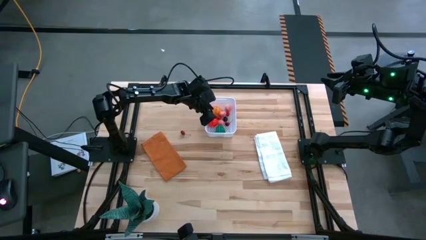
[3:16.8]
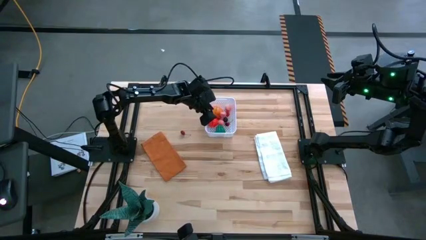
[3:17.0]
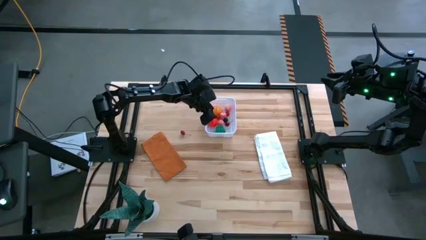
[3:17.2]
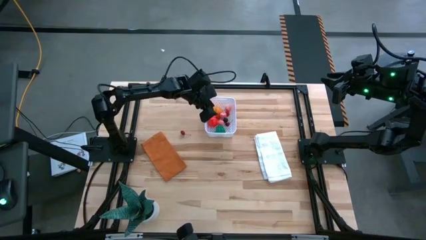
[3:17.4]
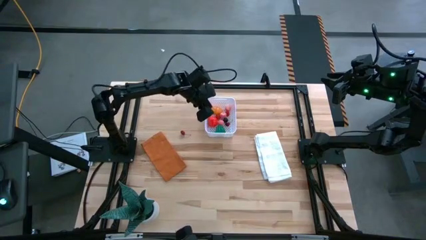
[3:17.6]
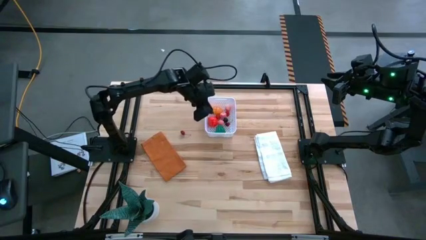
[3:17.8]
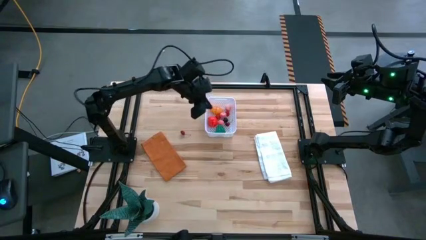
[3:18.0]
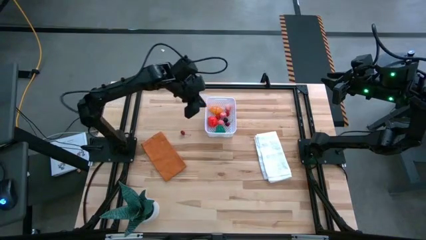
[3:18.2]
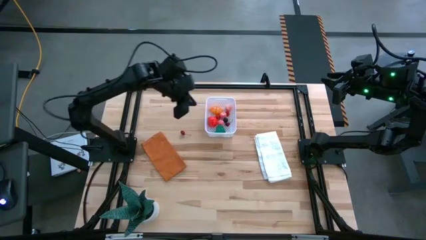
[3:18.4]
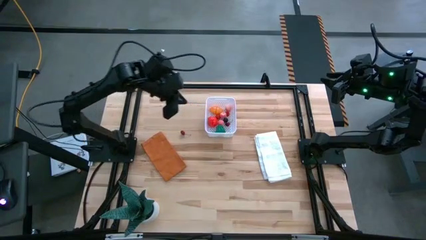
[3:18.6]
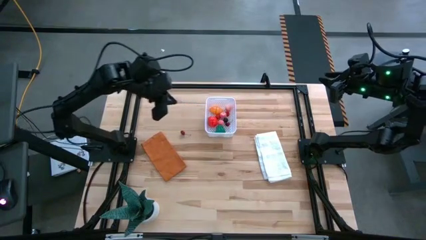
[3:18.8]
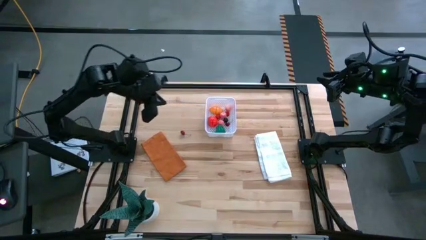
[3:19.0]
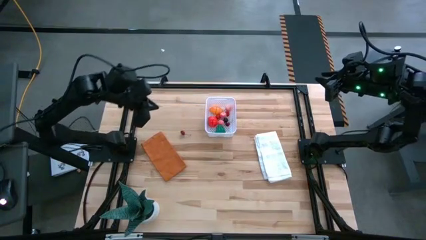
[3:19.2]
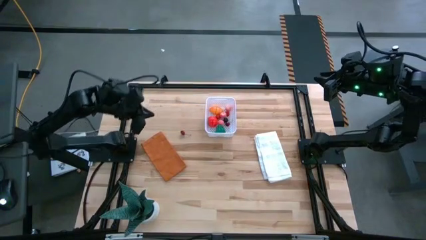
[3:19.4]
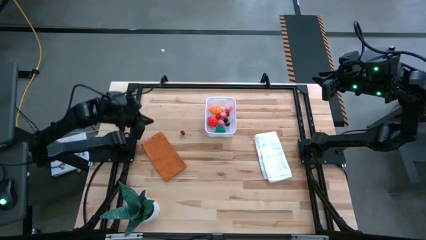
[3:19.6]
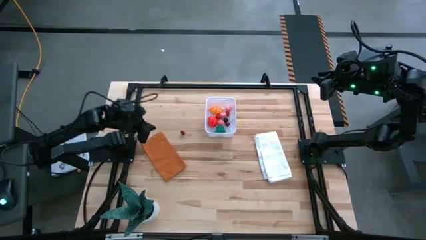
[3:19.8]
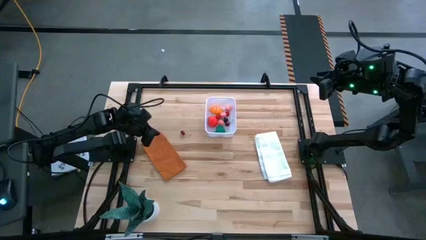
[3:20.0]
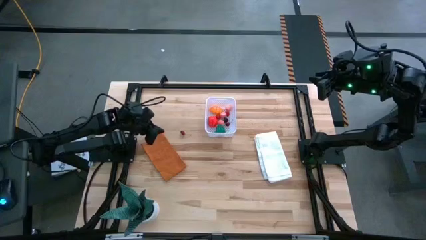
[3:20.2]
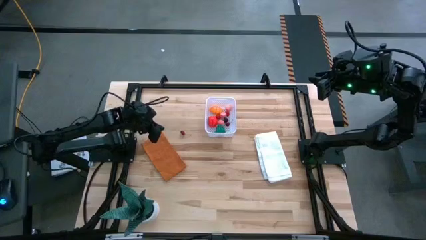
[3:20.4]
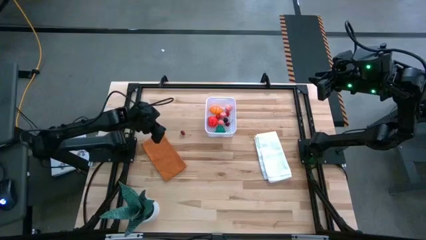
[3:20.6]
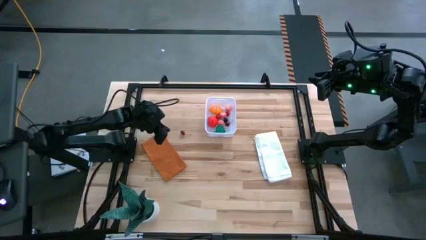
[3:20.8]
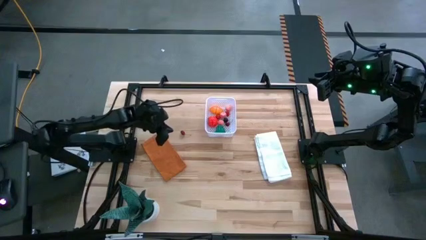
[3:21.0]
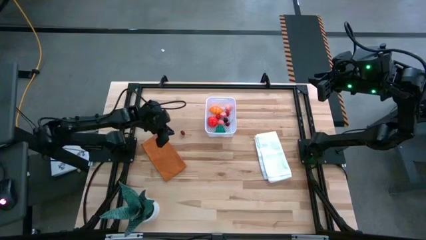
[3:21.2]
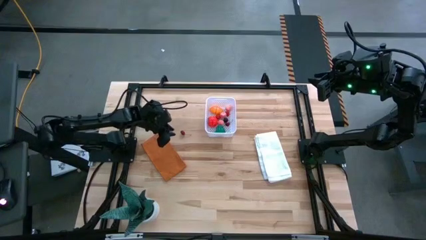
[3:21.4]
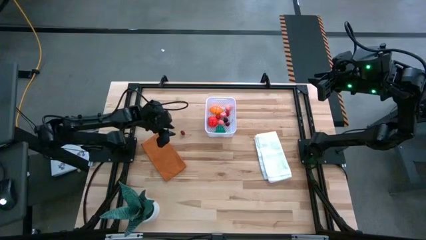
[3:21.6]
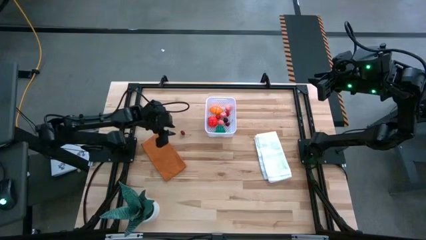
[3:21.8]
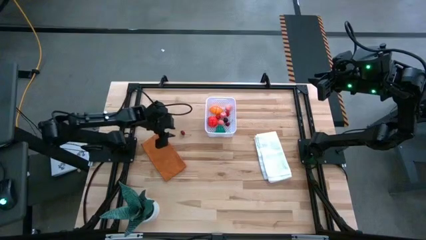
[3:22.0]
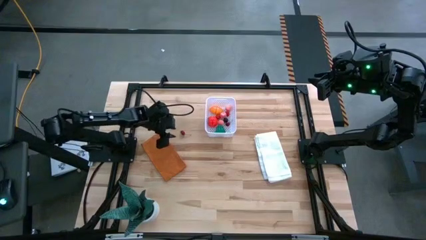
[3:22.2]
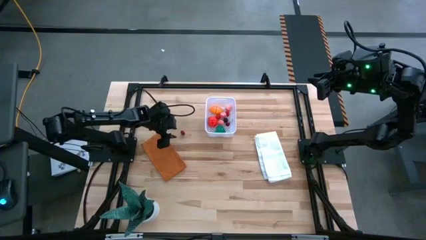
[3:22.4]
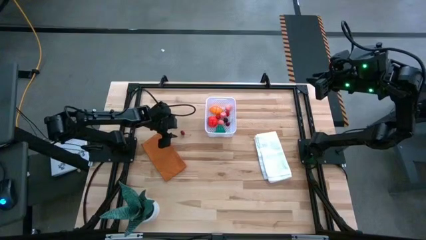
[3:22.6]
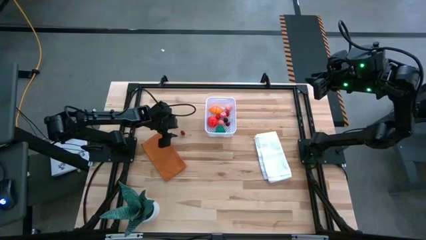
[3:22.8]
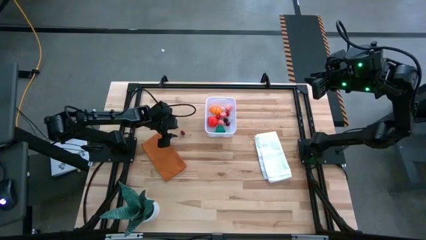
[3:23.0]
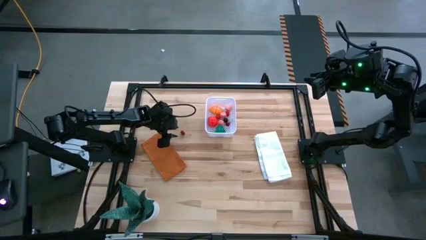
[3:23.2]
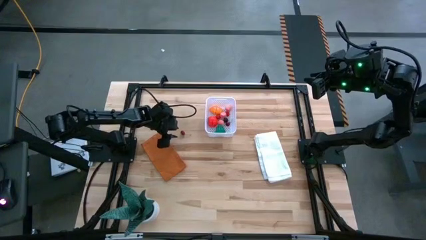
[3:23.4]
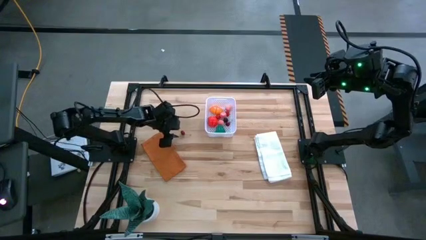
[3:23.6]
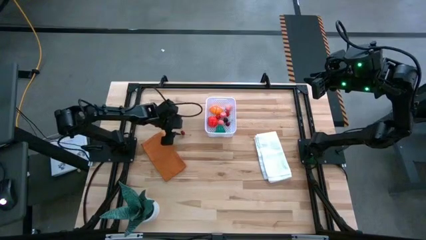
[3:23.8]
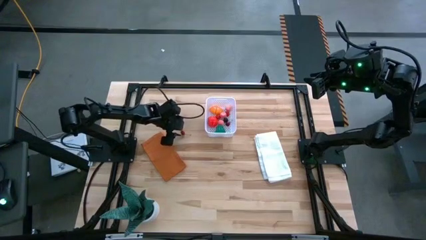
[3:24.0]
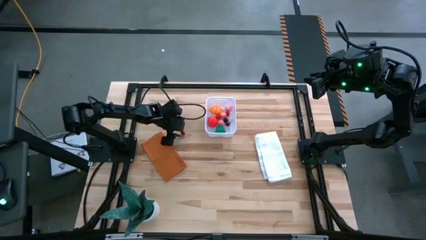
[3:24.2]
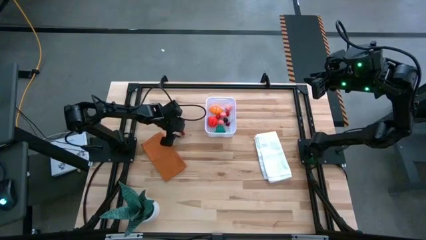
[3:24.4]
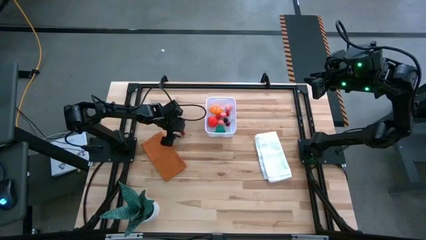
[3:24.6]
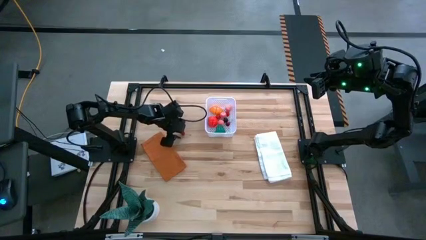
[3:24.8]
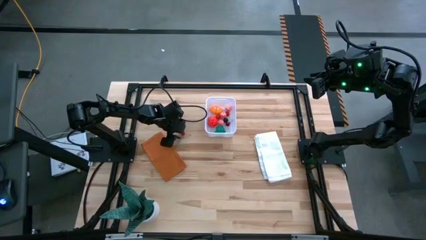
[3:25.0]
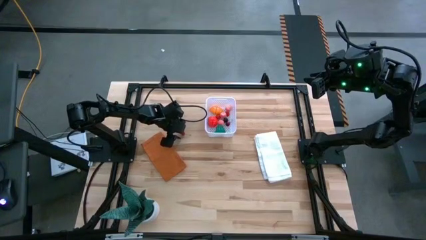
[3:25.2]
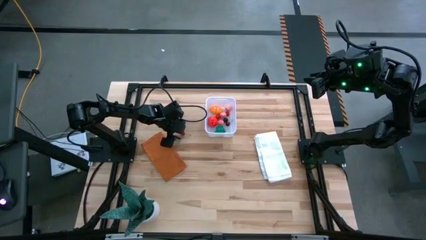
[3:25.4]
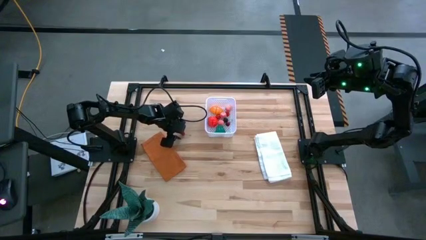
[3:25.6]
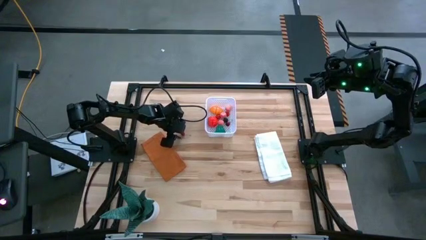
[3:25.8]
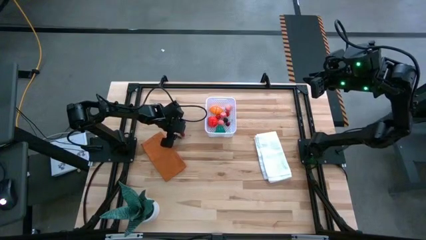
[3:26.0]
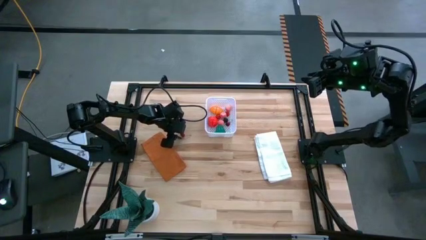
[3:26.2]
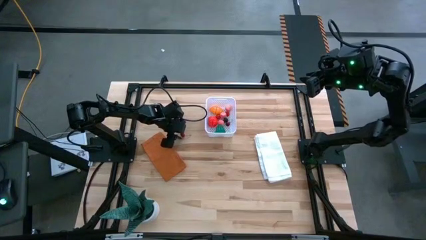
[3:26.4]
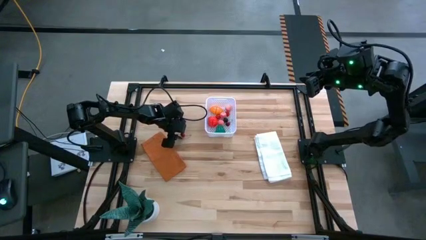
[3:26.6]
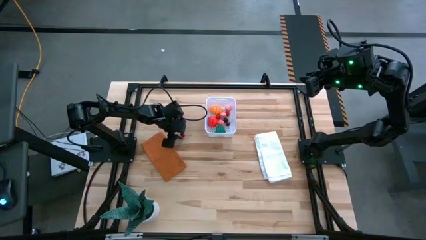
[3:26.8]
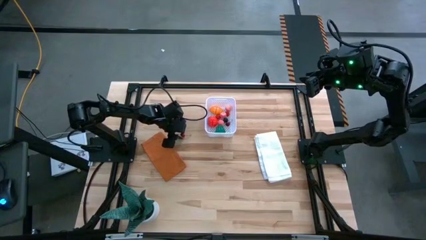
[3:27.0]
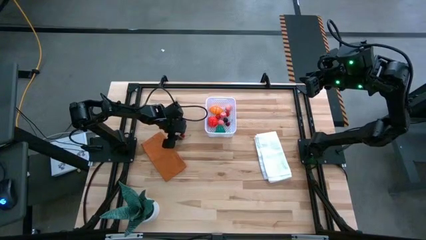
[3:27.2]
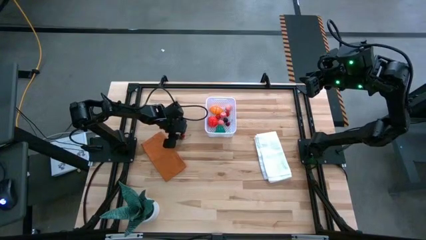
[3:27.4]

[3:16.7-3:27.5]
Task: Pick and placing Produce into tupperware
Put the red cherry into the white bin

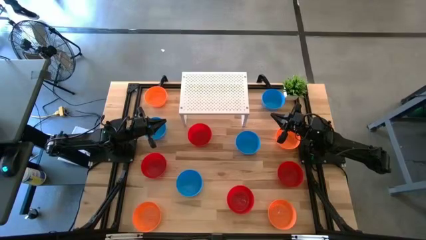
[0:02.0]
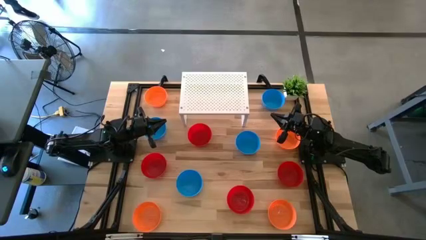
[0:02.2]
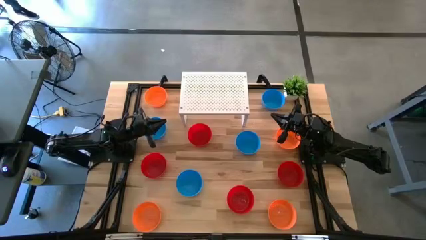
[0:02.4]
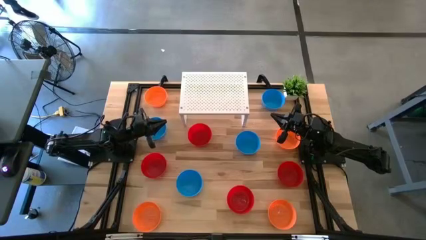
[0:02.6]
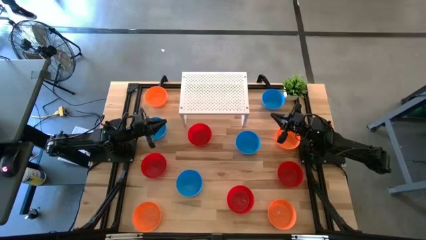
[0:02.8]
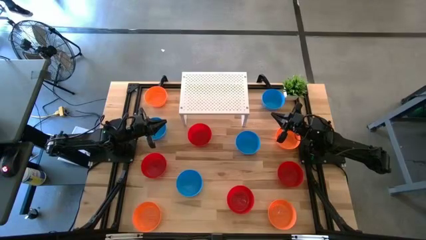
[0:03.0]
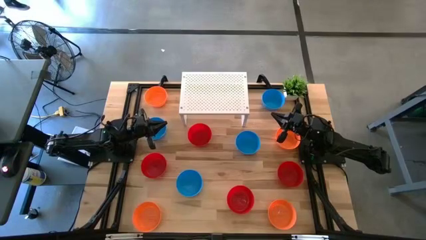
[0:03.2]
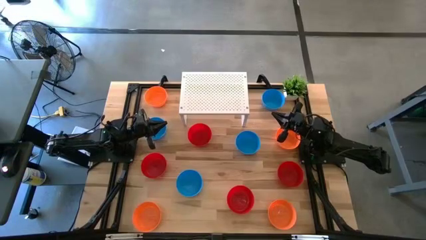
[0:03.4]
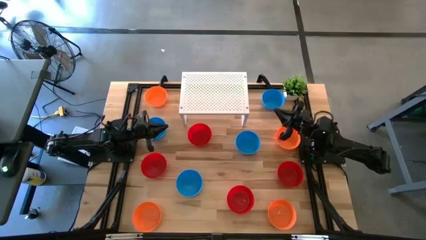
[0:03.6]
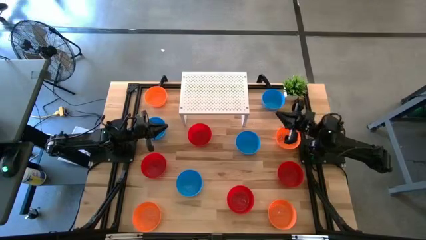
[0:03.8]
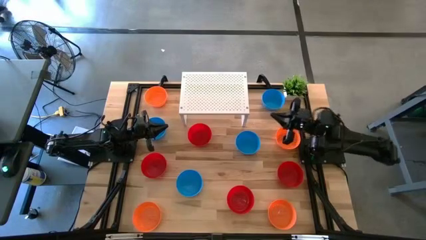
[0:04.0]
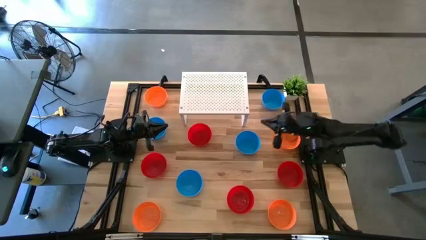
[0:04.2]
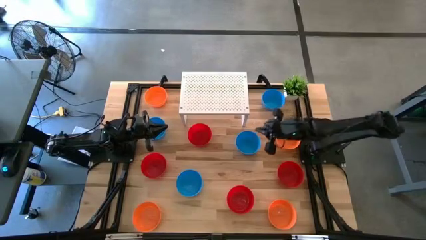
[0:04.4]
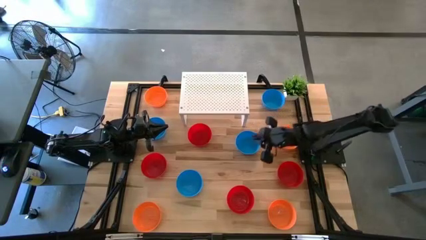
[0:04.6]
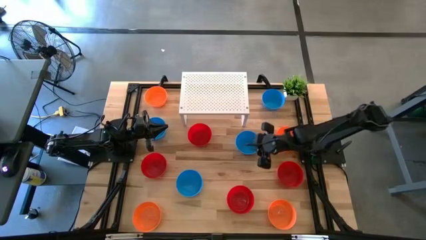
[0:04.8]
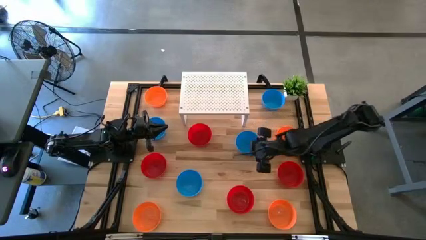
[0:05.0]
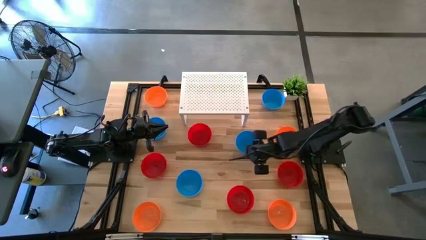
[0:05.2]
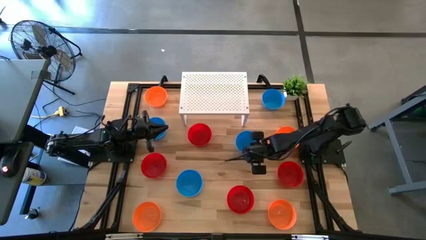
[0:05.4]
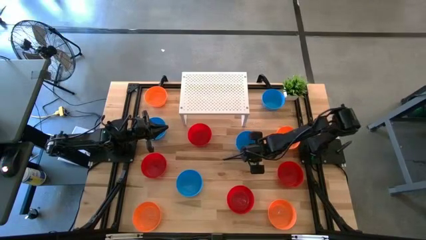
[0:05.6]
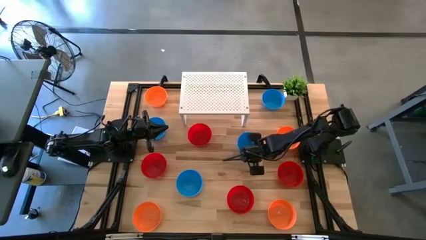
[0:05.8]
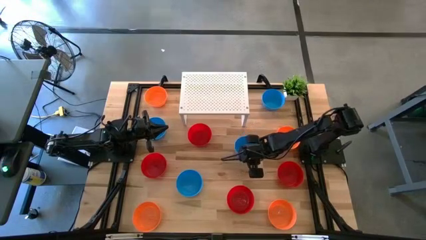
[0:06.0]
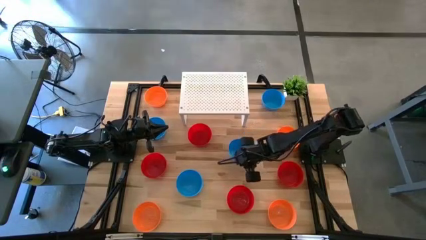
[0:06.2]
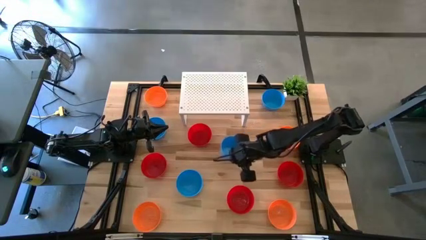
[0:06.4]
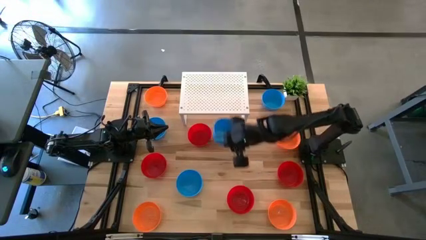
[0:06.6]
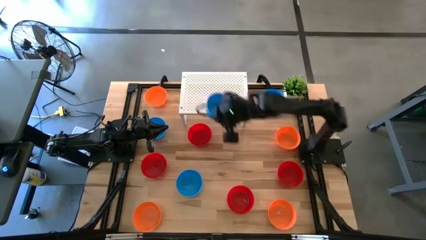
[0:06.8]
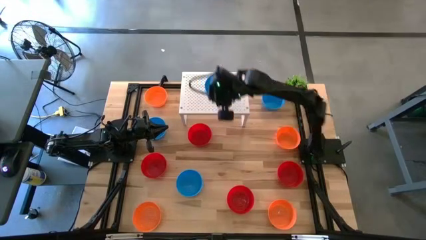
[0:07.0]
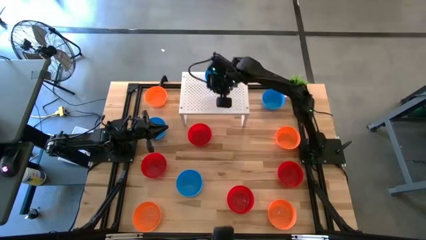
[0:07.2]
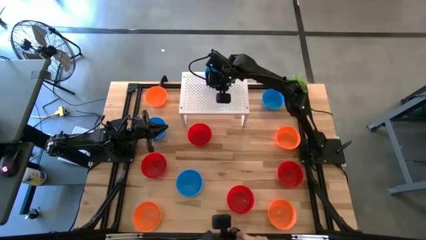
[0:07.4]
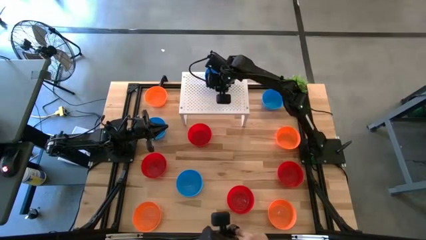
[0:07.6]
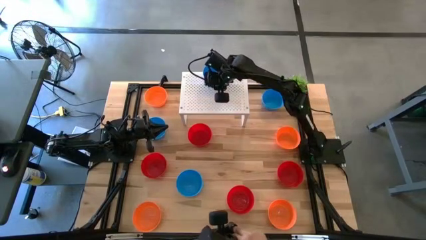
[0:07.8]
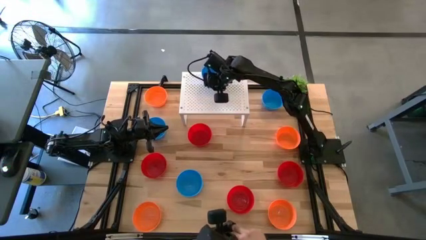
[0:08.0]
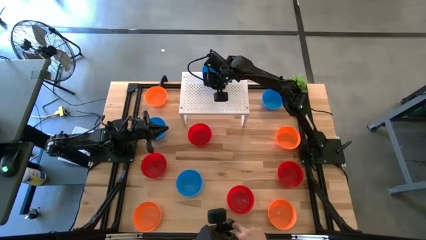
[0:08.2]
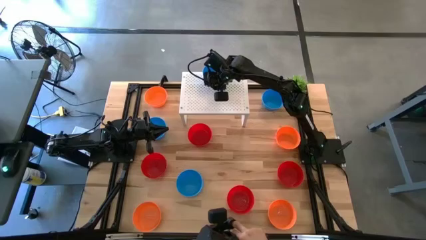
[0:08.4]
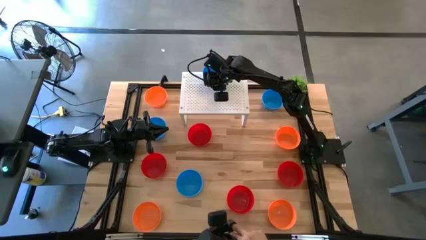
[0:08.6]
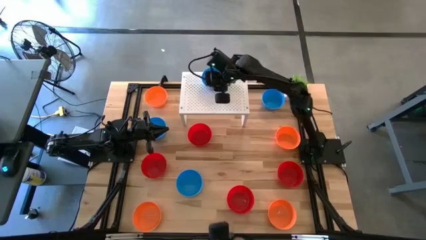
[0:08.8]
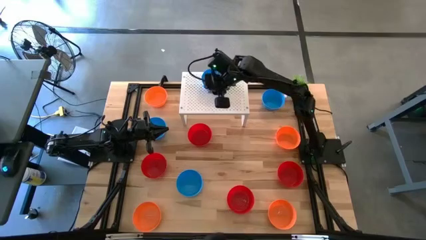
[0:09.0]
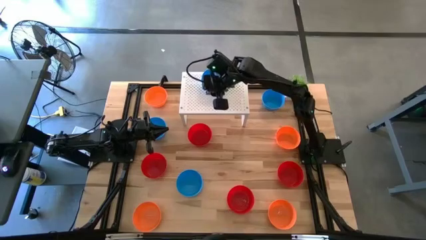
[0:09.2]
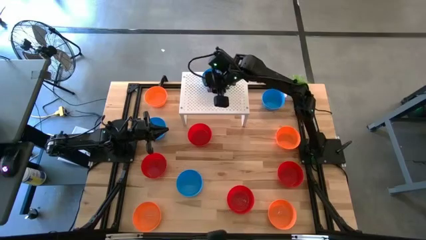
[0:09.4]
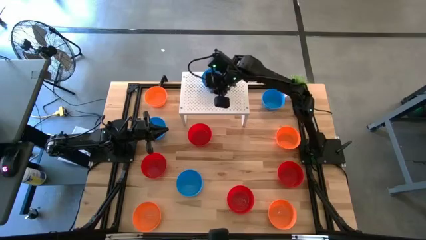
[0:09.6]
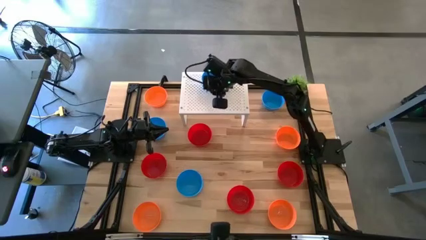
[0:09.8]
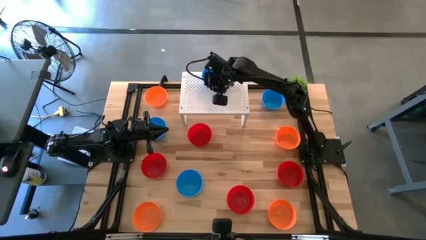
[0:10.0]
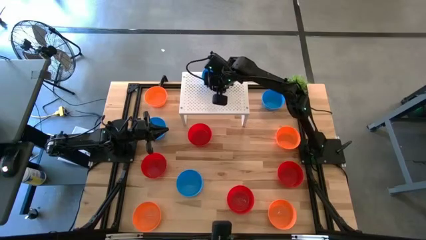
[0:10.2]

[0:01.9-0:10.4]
Task: Pick & Place Mini bowls
Put the blue bowl on the shelf
